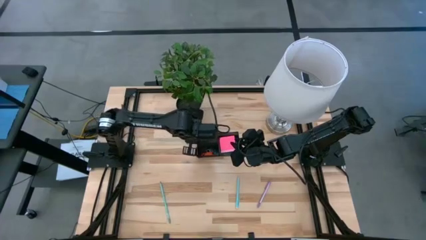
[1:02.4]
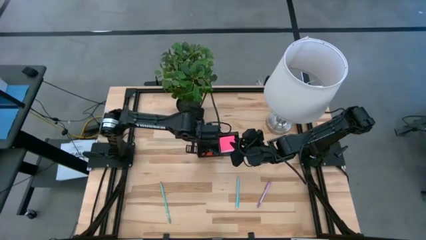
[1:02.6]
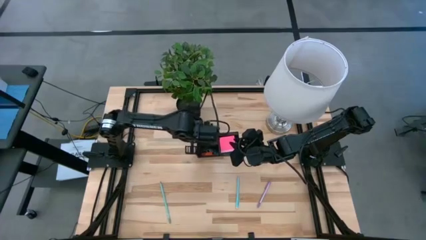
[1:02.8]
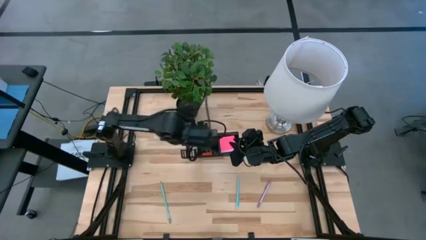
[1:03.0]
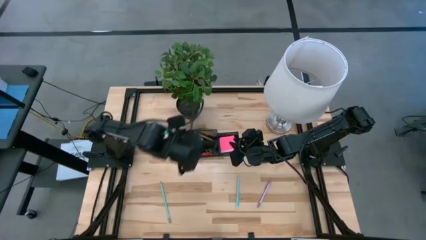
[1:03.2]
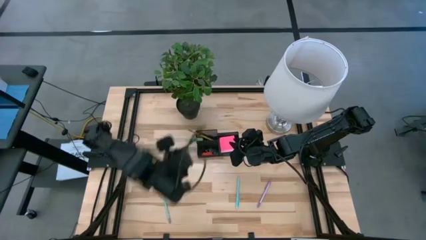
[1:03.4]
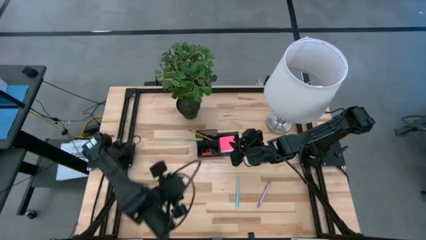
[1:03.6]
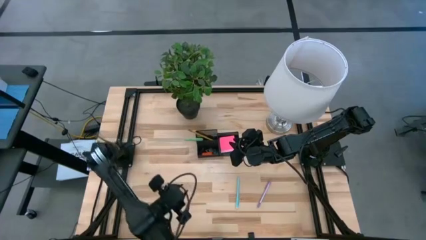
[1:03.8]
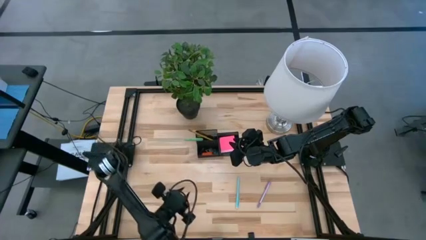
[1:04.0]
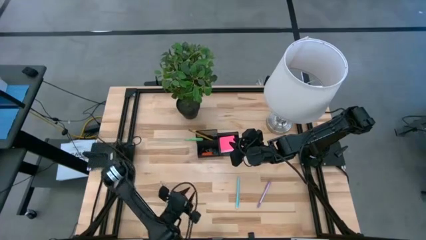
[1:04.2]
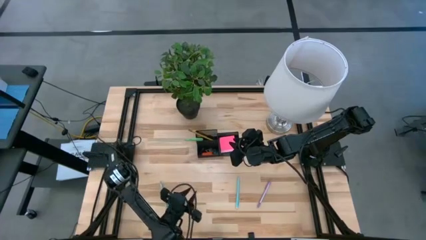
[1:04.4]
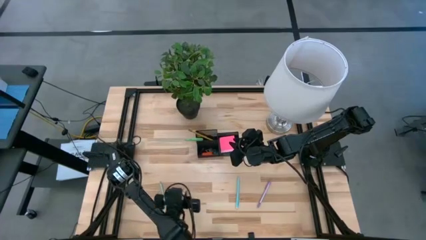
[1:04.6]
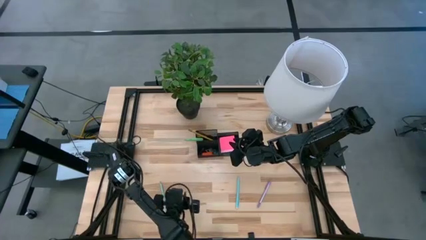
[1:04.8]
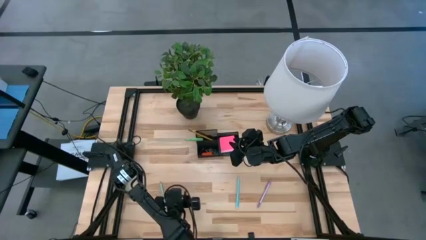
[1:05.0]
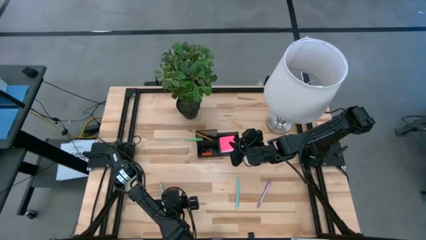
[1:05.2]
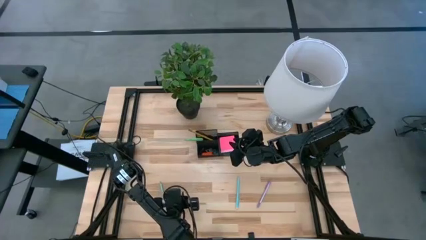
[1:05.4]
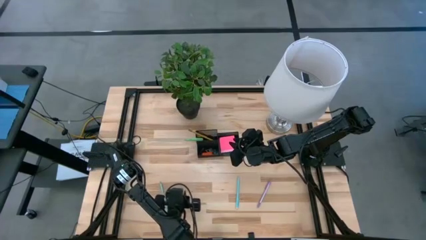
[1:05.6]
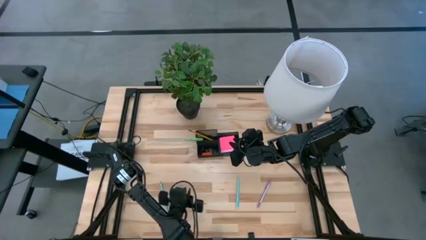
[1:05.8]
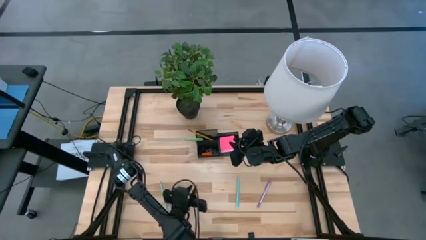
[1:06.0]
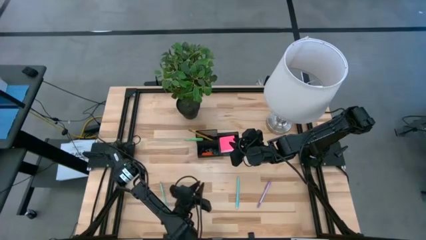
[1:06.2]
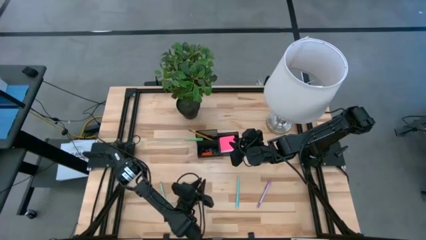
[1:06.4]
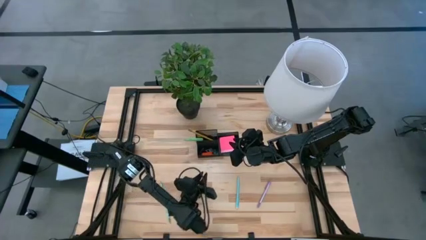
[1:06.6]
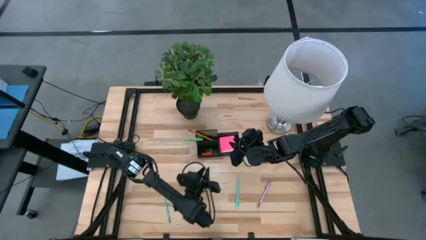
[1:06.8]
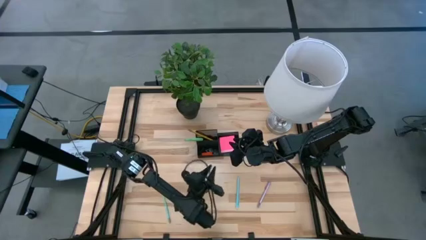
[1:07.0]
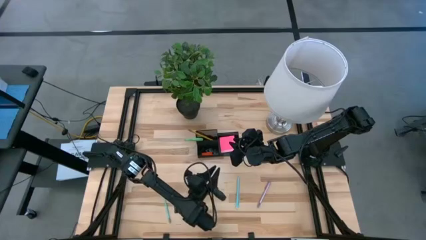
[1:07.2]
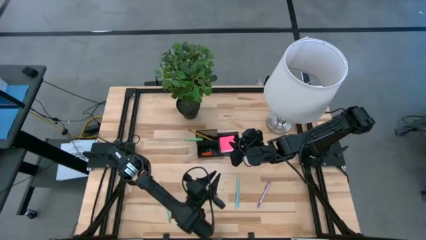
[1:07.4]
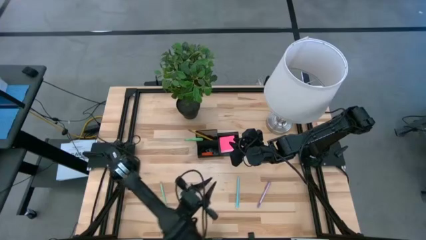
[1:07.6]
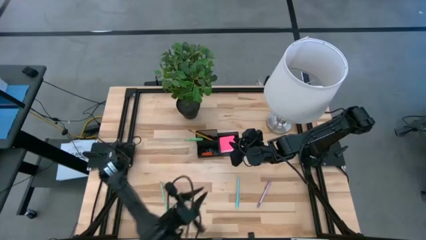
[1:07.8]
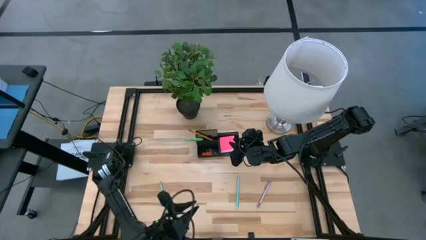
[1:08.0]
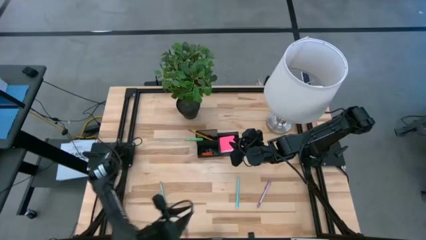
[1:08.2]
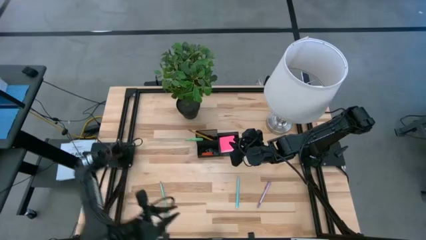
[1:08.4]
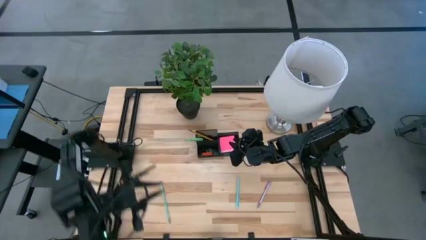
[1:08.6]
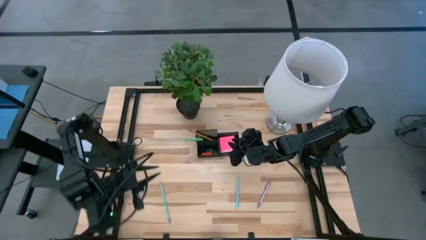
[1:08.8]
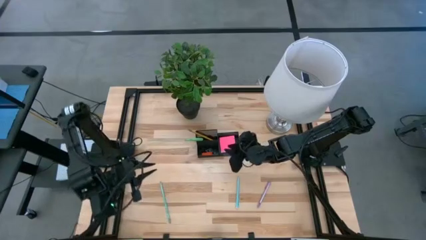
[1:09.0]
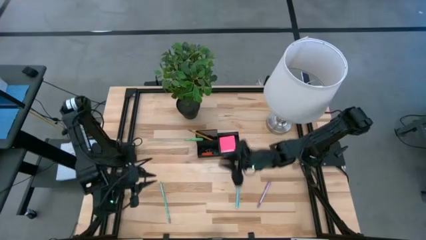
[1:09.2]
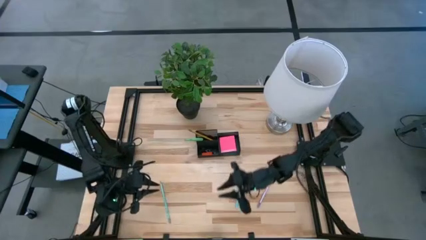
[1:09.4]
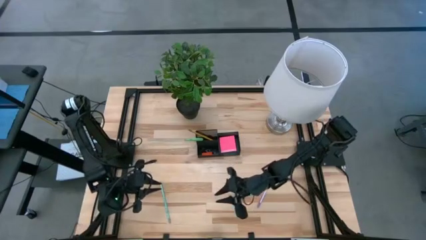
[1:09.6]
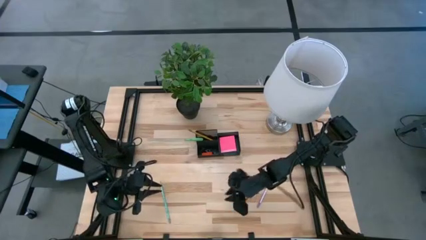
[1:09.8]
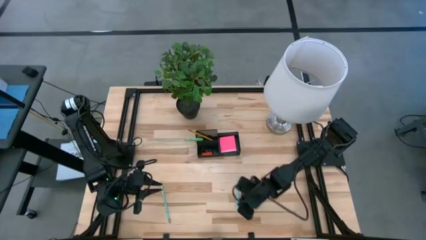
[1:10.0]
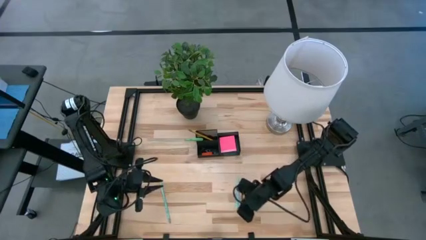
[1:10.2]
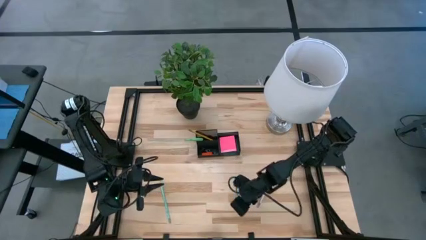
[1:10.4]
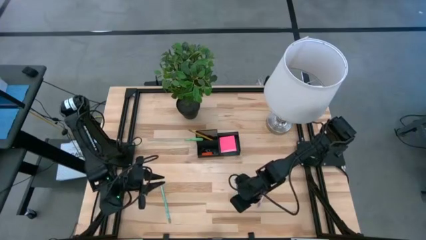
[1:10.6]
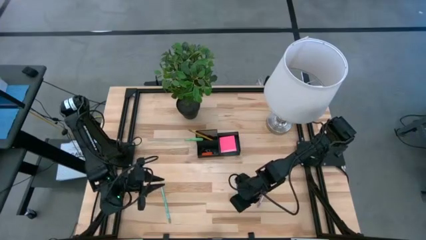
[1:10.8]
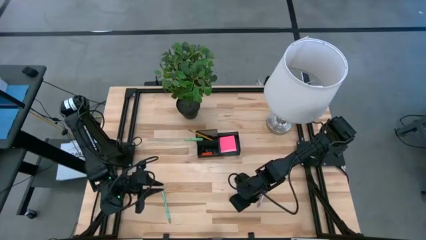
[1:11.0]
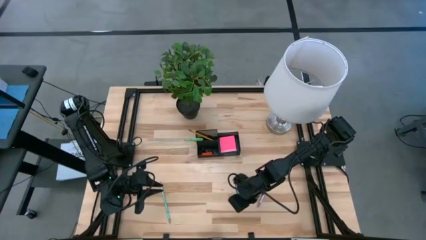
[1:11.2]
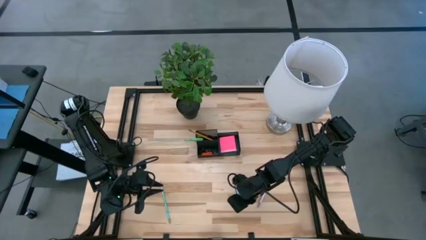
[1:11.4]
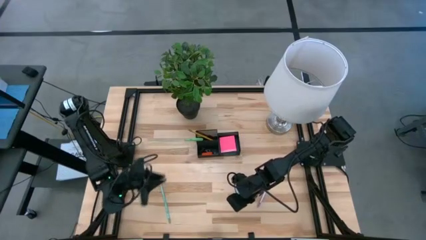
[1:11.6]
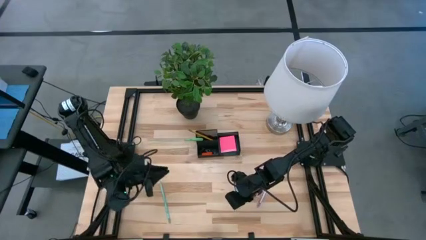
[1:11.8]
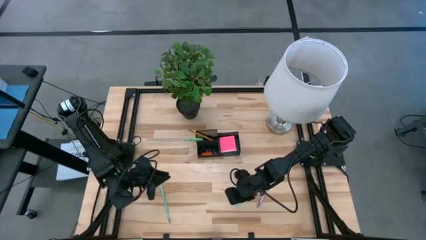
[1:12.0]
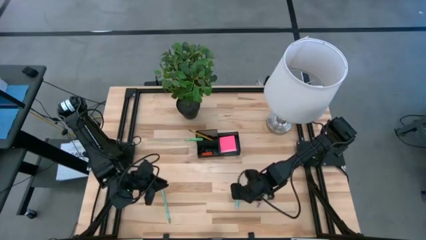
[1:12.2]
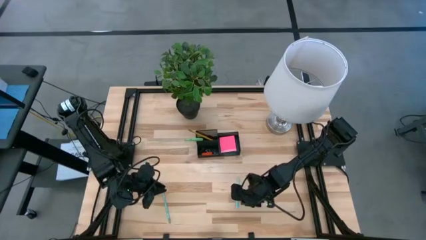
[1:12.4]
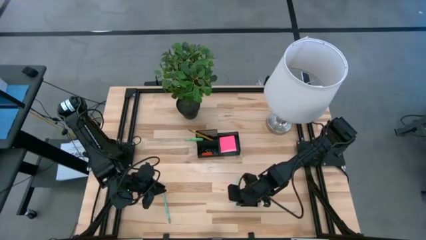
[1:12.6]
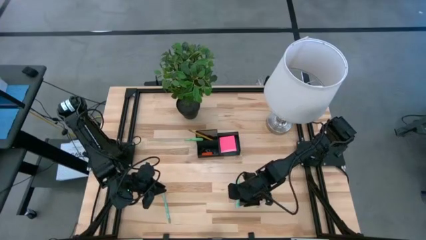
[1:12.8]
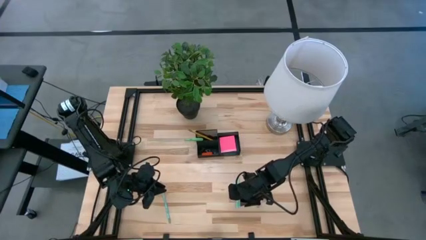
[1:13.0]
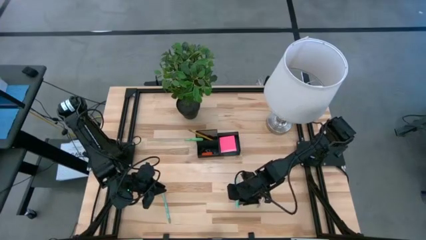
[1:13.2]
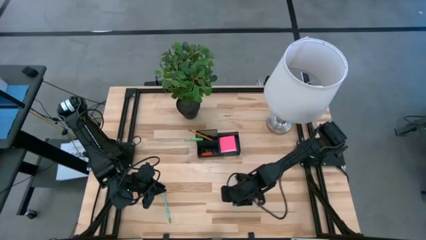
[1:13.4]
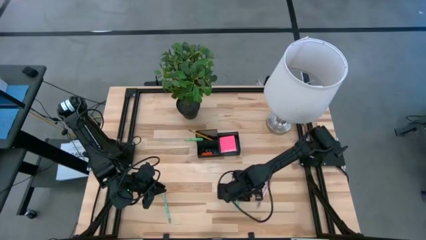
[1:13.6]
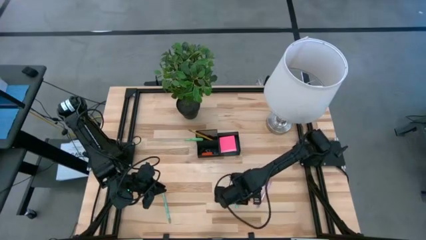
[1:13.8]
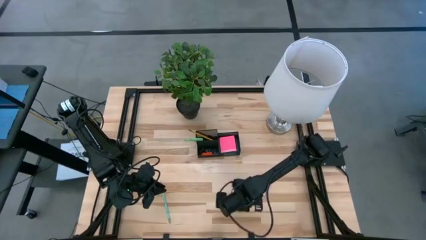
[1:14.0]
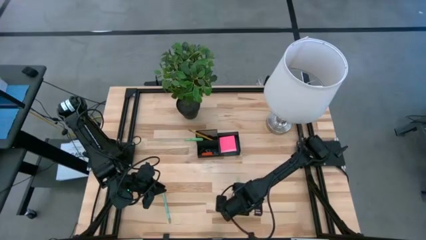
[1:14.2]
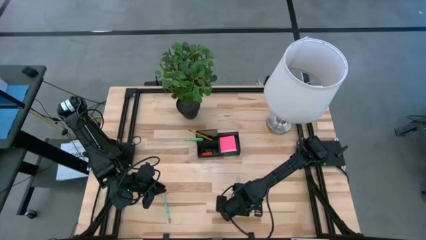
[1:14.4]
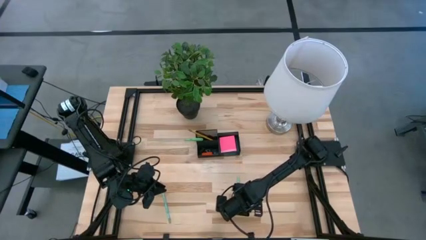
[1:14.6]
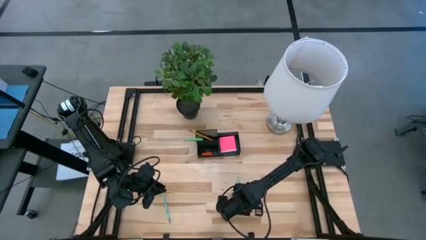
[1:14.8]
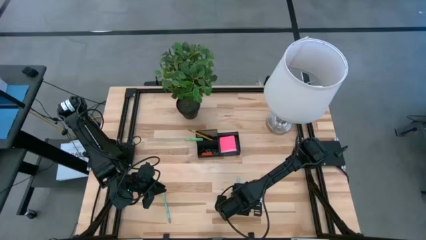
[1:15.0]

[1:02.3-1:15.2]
Task: Pick and place office supplies into organizer
Put the blue pen into the black desk organizer
